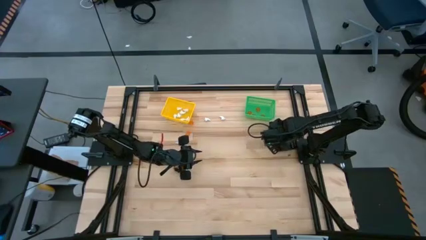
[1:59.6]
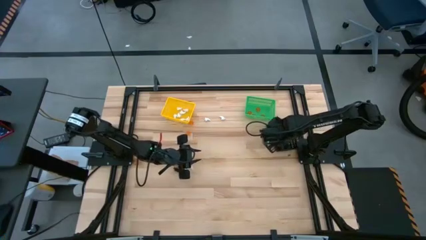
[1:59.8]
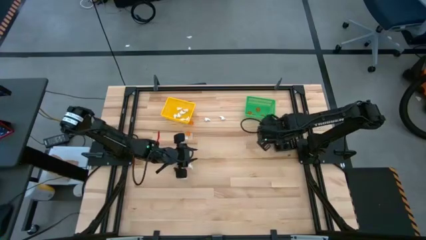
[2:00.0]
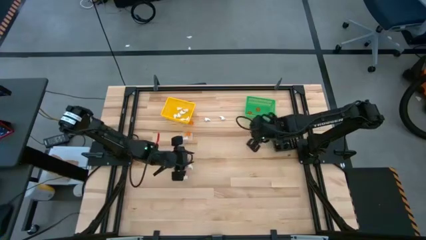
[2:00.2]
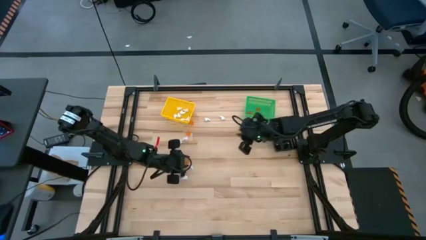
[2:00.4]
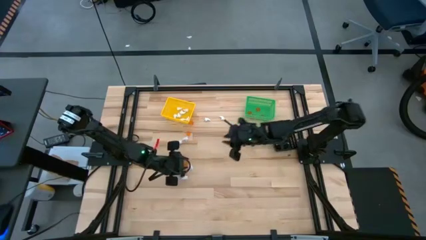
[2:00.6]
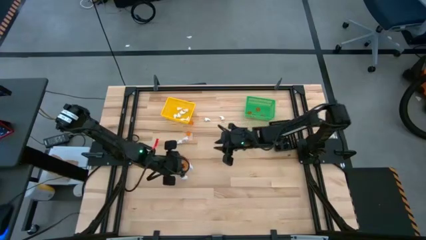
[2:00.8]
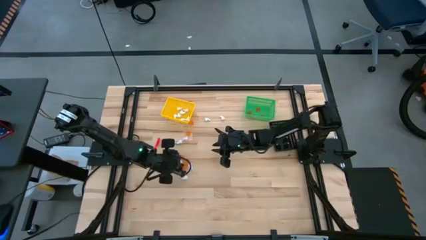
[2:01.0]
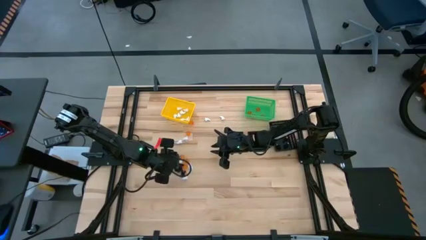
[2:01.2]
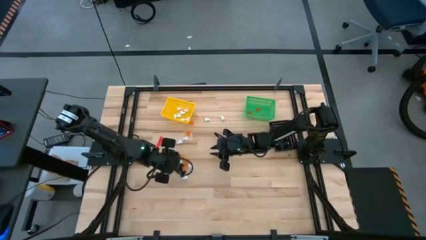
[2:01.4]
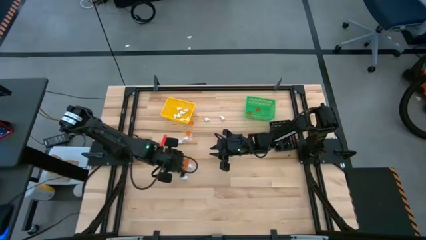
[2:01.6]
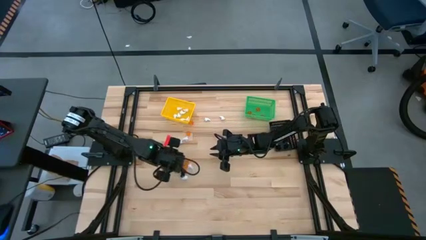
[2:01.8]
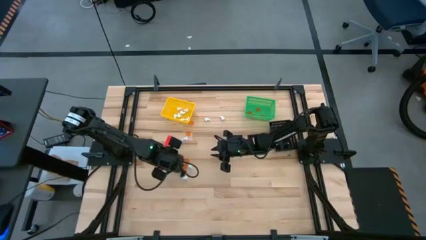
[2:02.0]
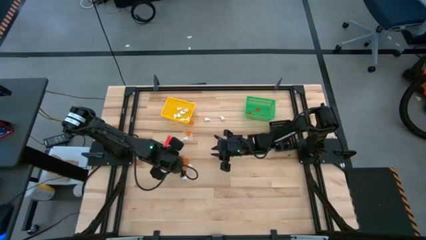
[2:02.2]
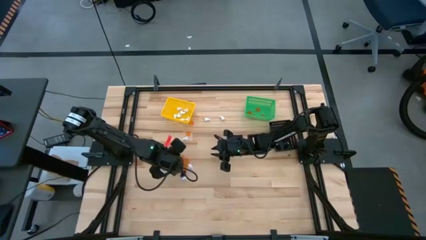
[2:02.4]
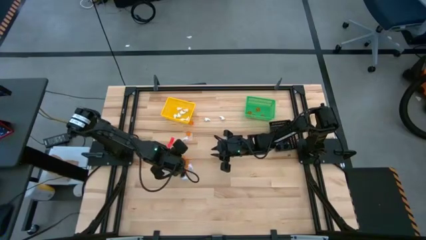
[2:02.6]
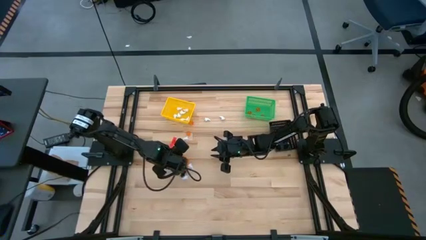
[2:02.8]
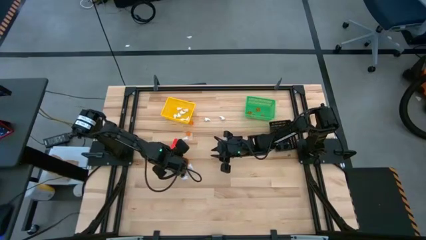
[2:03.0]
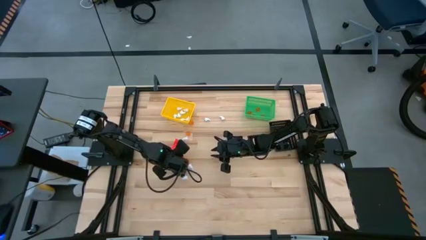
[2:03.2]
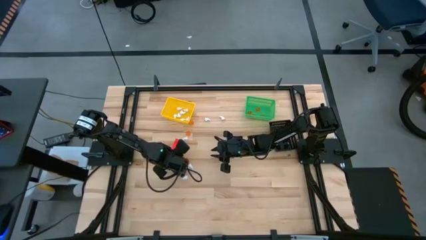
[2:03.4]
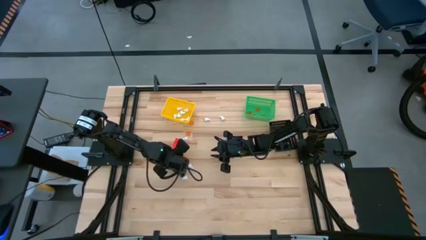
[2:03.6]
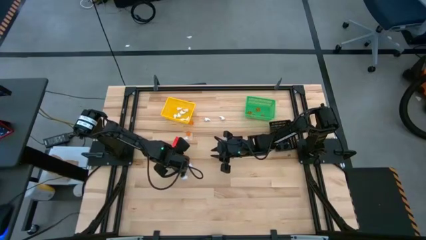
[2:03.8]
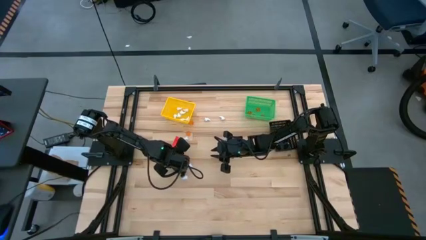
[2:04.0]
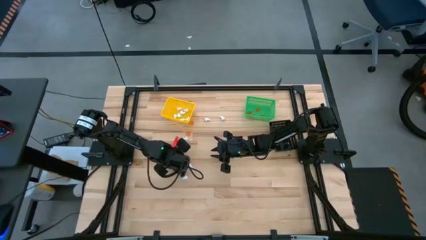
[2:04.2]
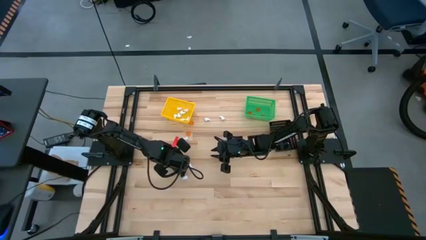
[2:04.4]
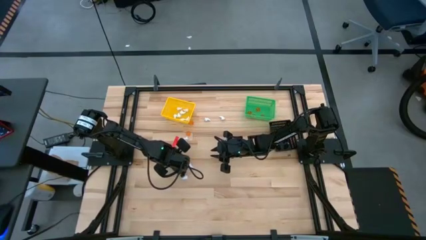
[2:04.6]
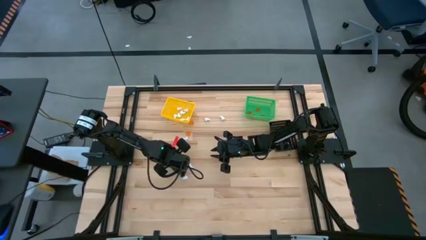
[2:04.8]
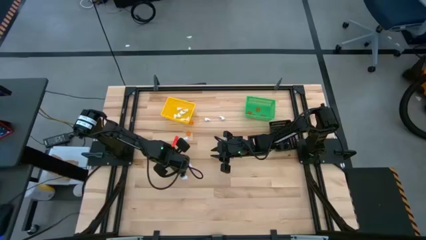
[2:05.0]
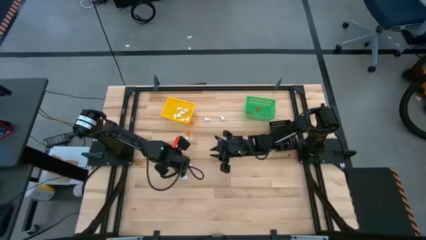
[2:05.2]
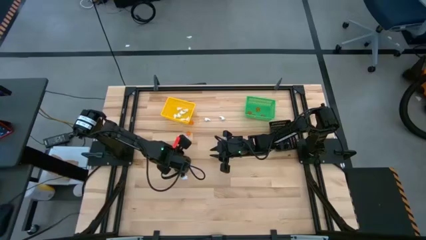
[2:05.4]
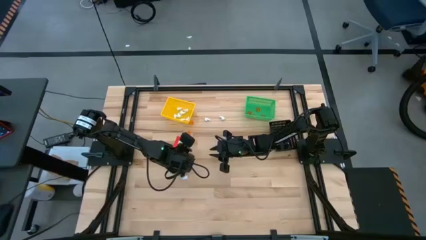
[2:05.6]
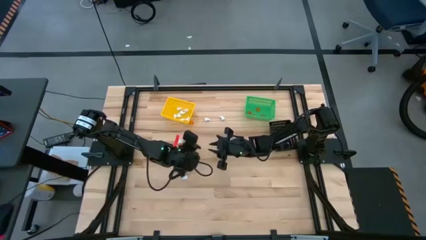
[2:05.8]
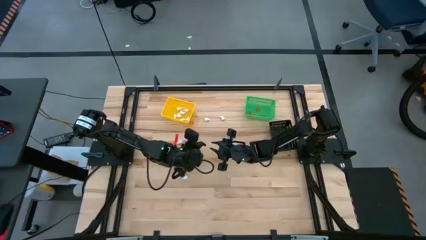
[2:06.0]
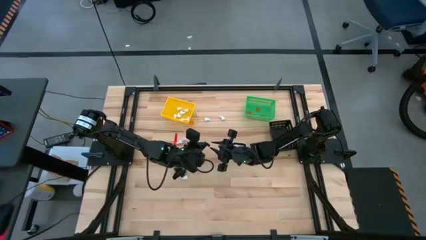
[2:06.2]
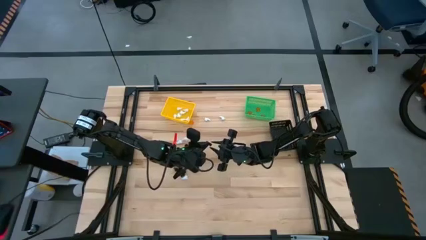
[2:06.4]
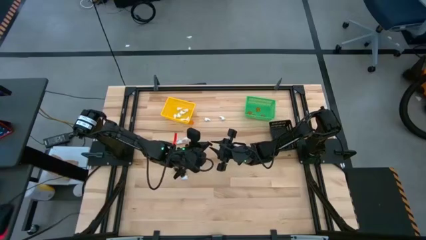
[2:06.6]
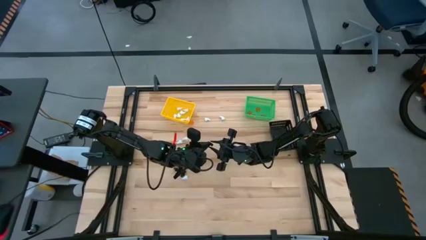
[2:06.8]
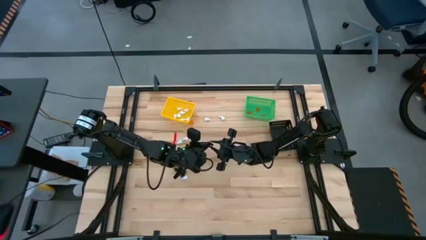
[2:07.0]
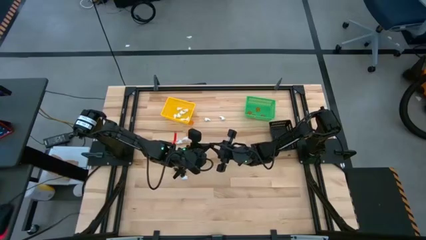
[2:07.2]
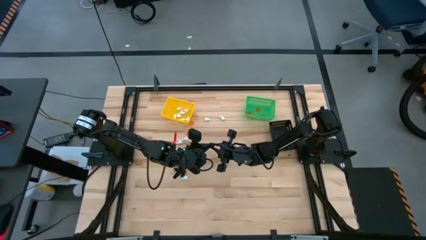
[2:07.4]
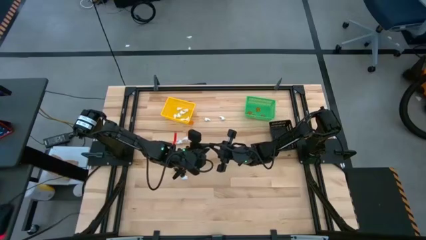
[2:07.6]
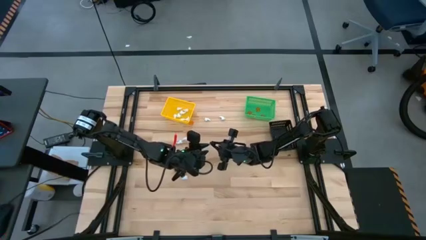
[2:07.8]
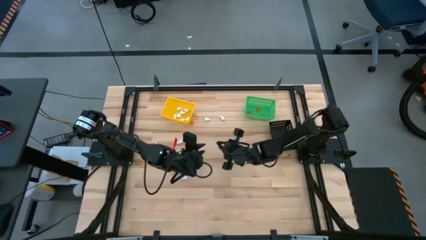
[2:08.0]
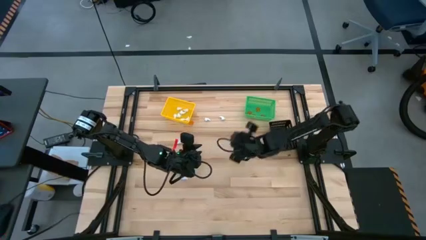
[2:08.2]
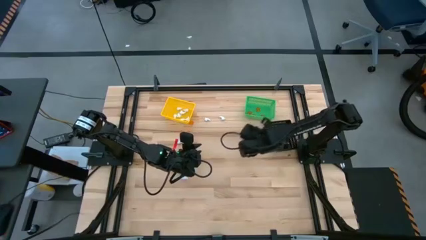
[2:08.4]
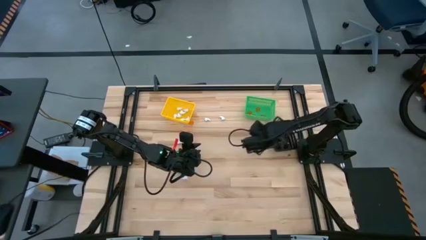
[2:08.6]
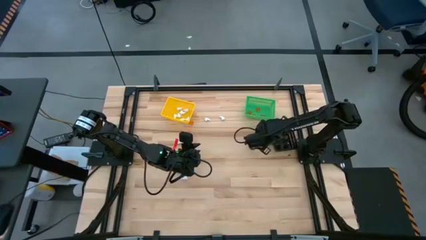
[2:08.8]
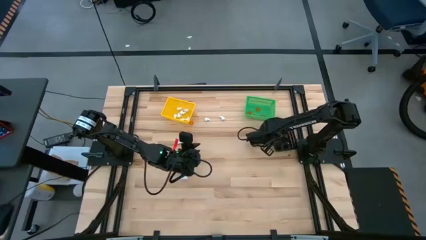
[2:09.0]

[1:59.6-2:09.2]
Task: Sort Halloween decoration
Put the black skeleton toy into the black bin

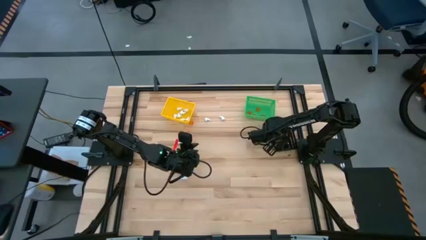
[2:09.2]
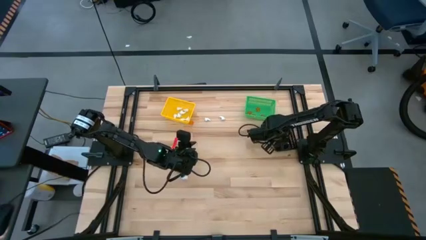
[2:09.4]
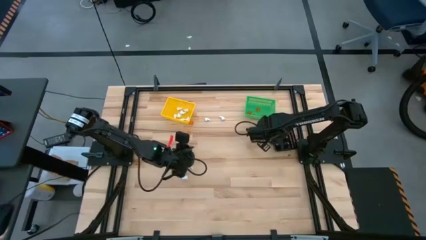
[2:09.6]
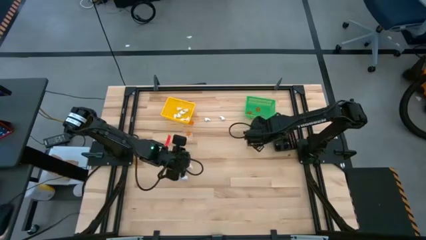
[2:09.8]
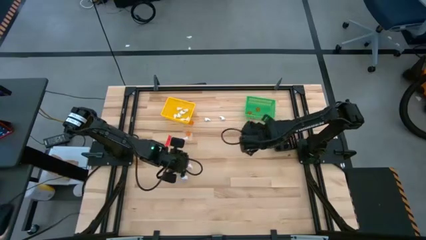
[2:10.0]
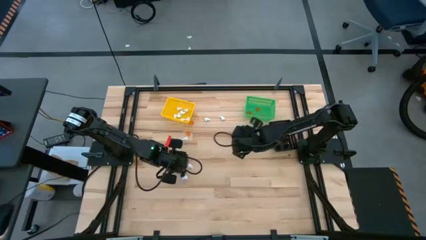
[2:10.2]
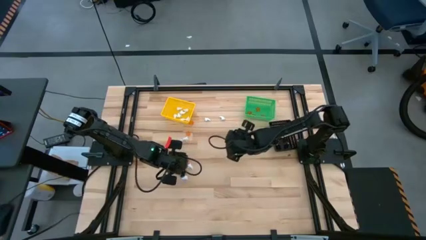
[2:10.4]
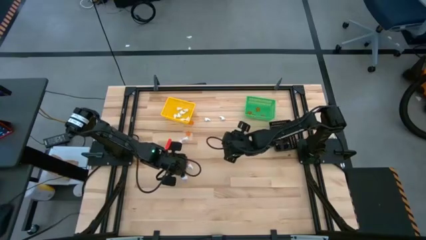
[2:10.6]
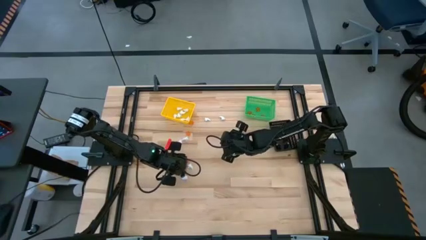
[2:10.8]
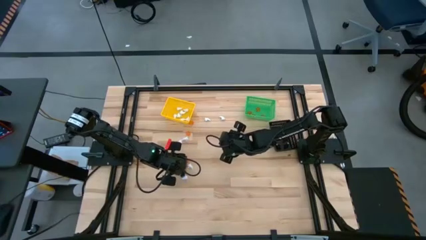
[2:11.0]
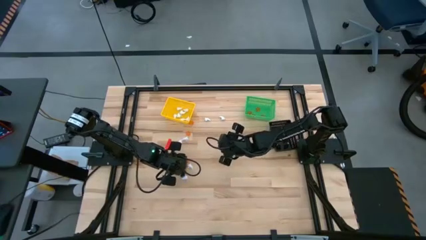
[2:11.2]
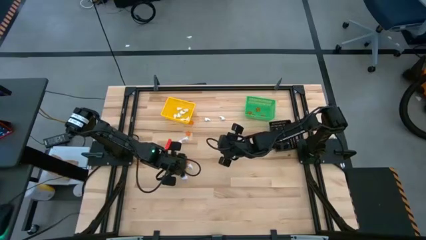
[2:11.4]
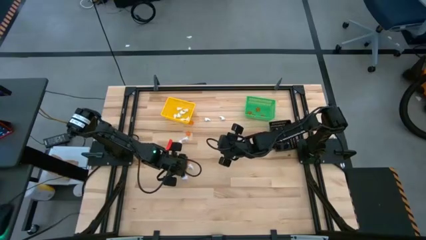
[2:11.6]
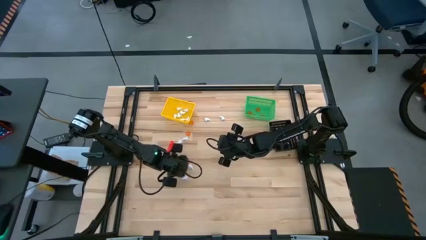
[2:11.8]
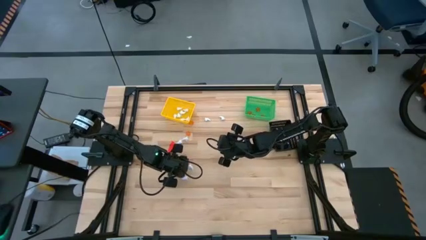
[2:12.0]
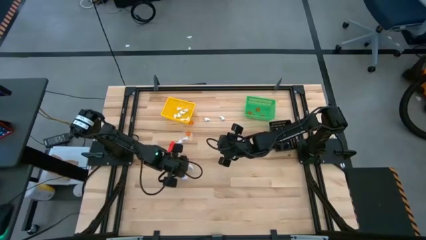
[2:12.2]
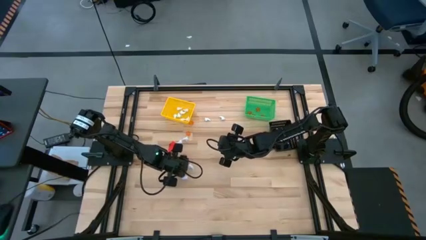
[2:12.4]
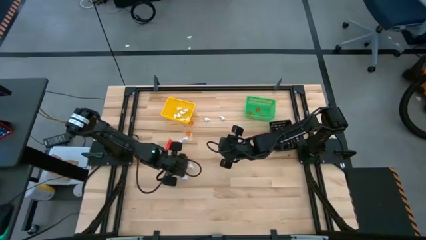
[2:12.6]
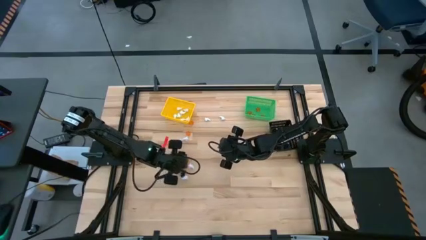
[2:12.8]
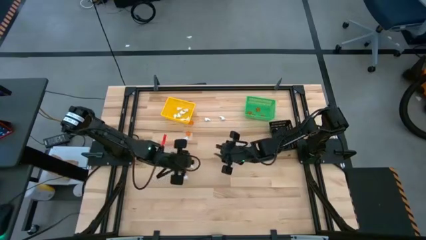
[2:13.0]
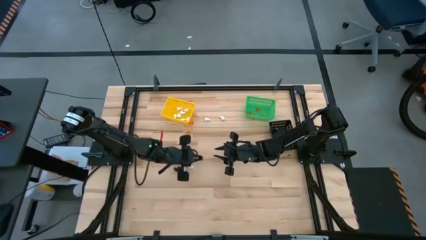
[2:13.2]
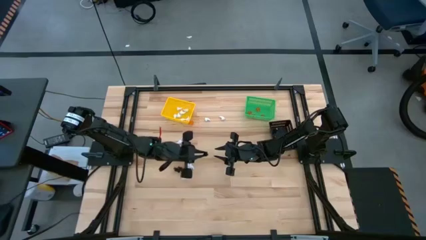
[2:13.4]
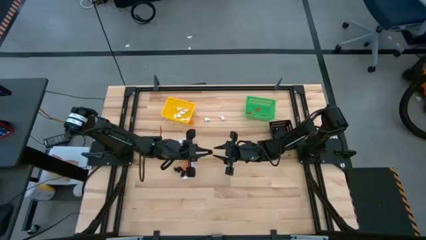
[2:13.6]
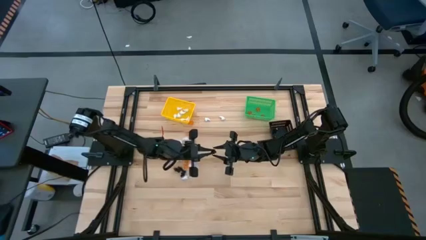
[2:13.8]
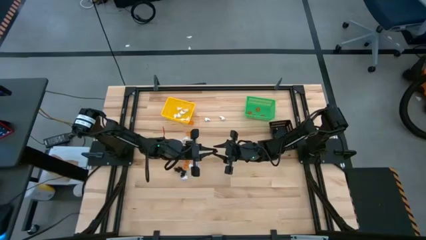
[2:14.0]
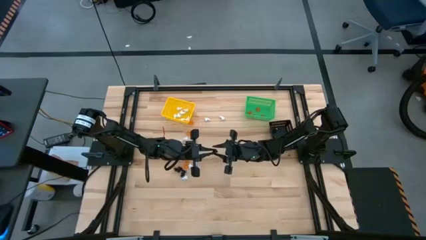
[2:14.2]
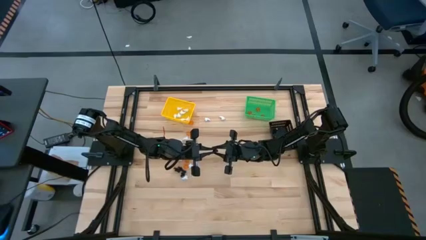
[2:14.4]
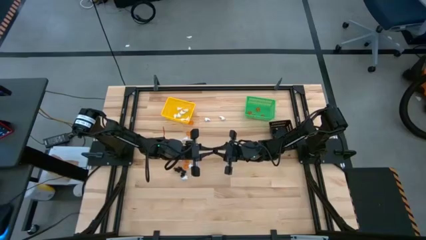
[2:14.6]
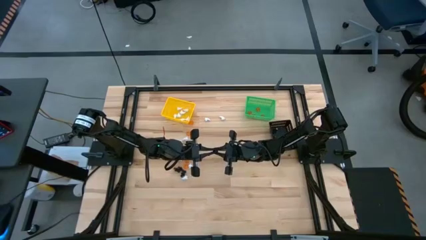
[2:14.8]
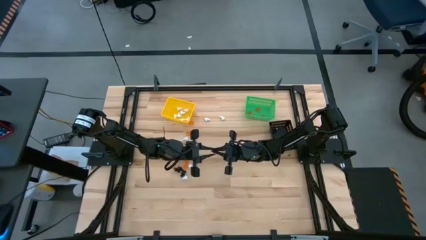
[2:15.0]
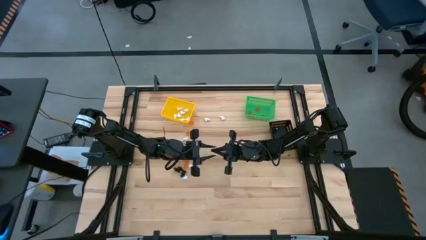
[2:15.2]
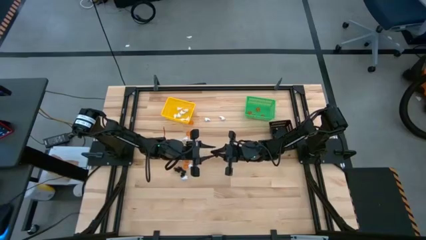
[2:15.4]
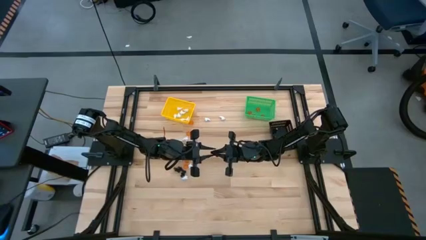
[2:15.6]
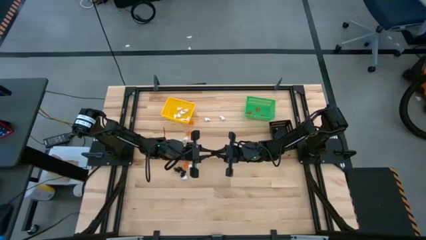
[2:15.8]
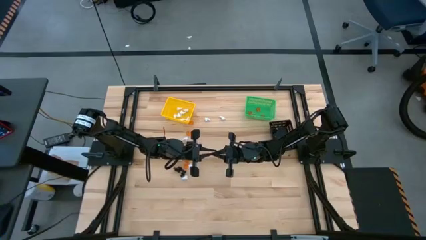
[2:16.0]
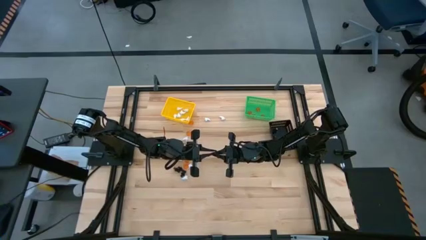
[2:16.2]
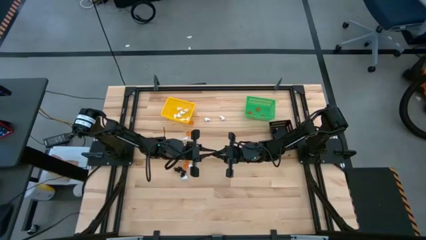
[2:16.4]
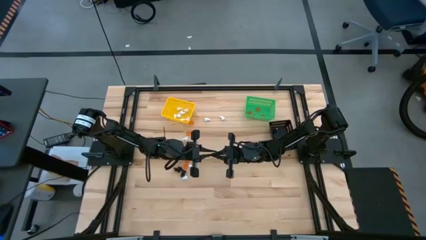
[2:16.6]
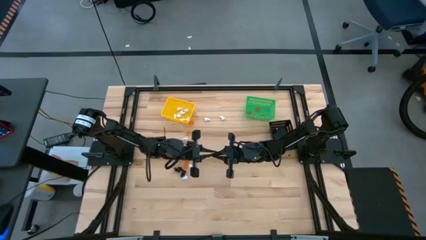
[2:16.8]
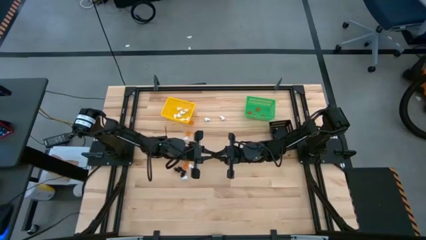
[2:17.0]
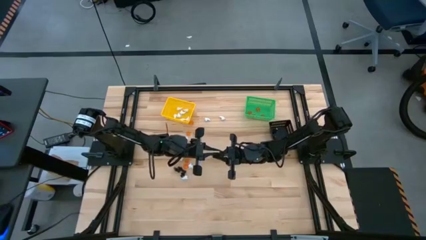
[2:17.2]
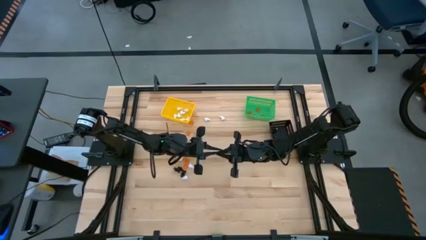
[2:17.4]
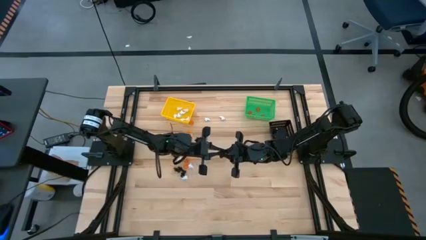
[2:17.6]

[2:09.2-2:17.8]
Put the black skeleton toy into the black bin
